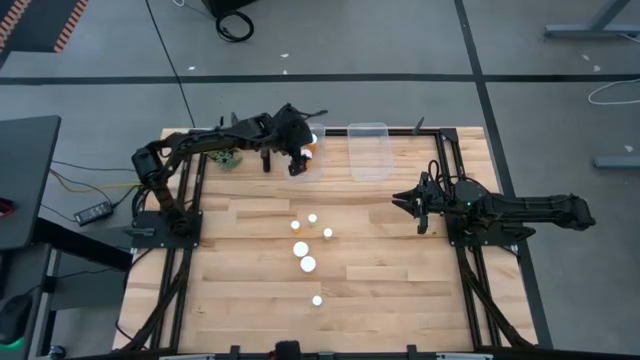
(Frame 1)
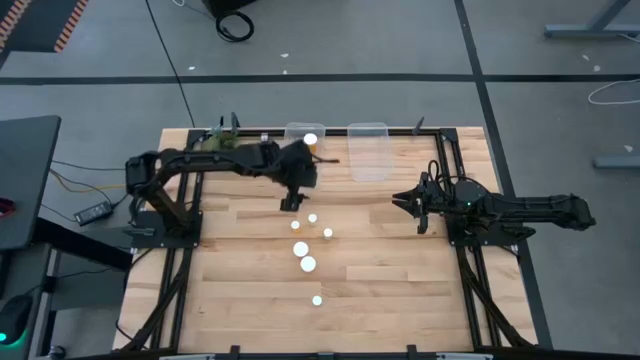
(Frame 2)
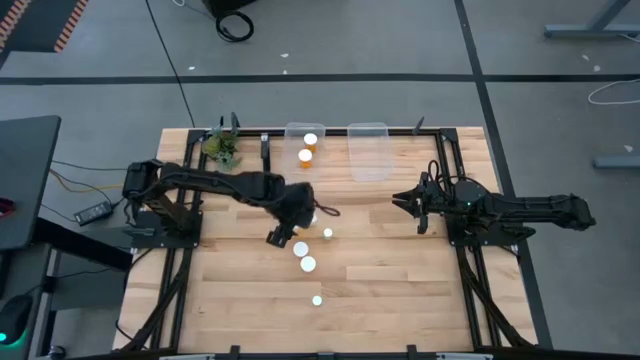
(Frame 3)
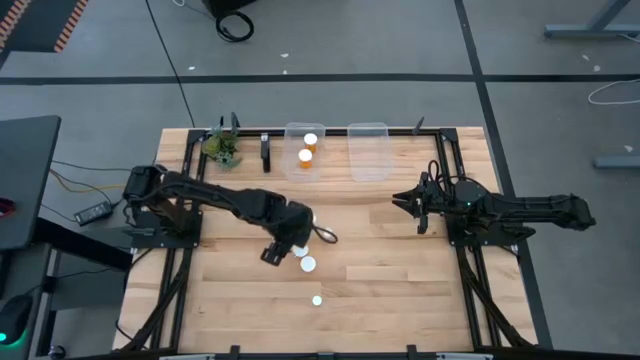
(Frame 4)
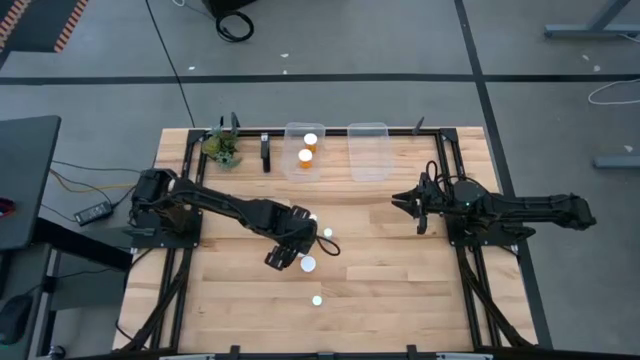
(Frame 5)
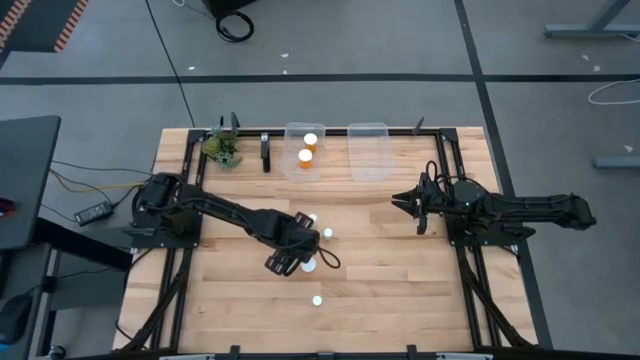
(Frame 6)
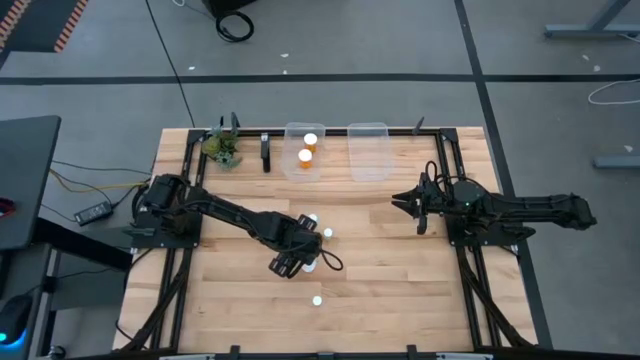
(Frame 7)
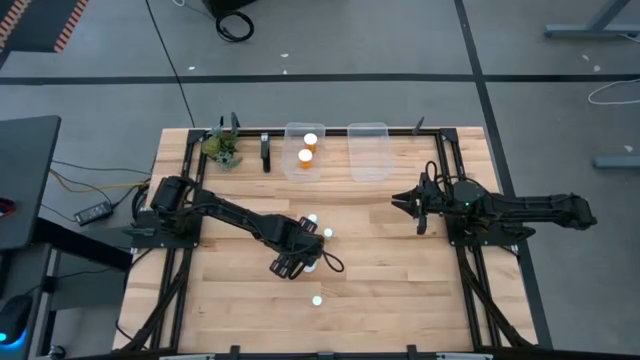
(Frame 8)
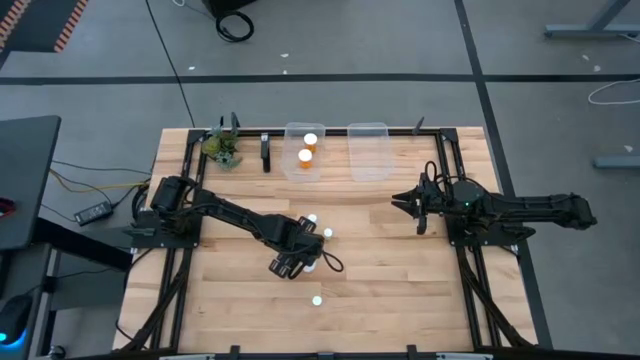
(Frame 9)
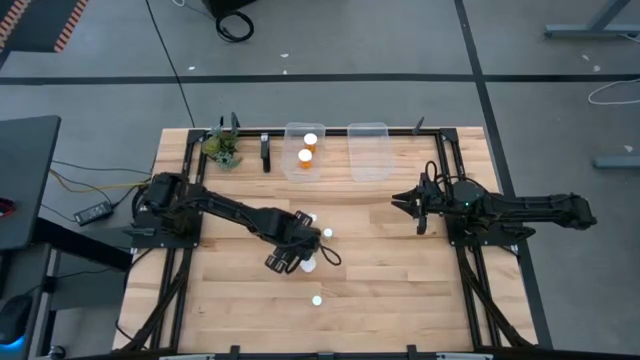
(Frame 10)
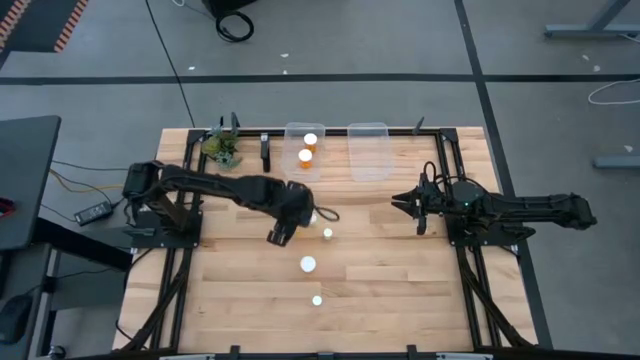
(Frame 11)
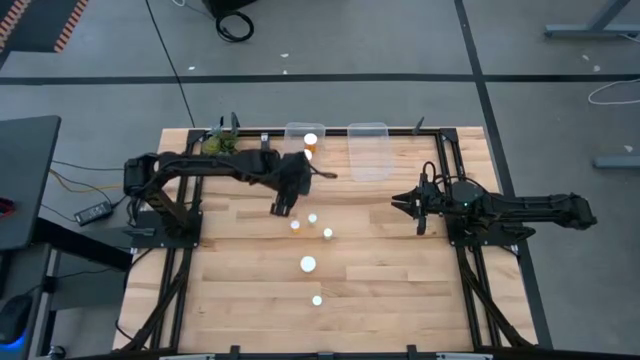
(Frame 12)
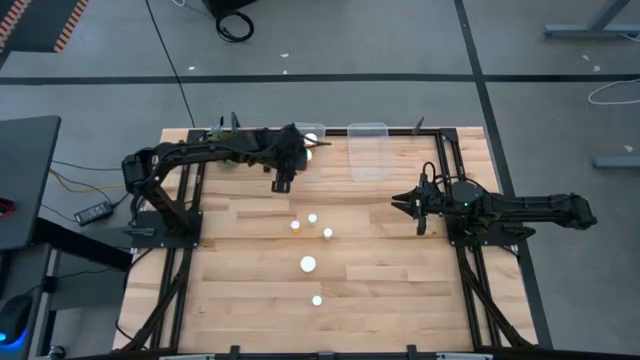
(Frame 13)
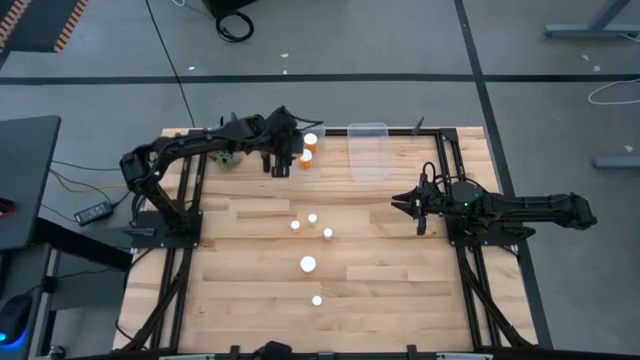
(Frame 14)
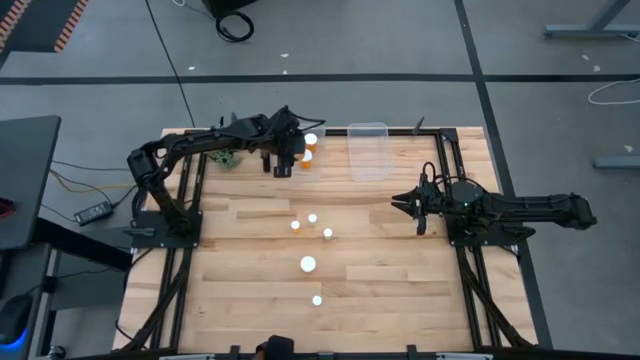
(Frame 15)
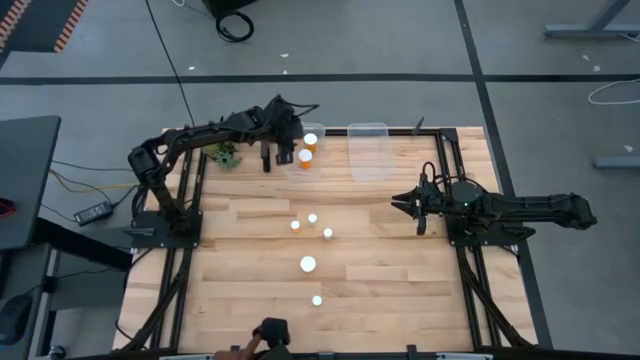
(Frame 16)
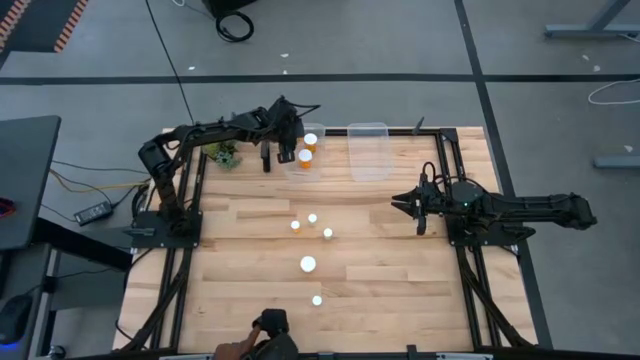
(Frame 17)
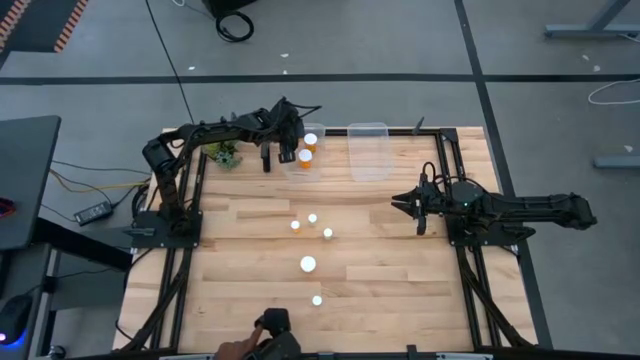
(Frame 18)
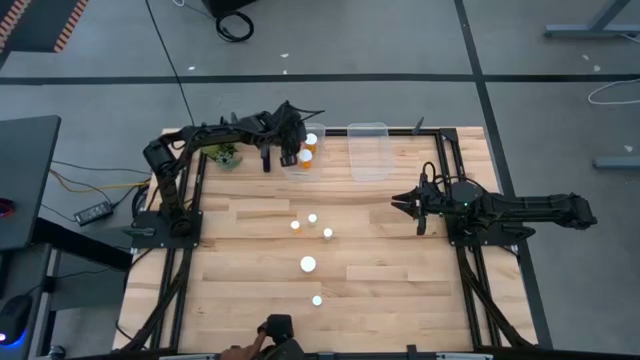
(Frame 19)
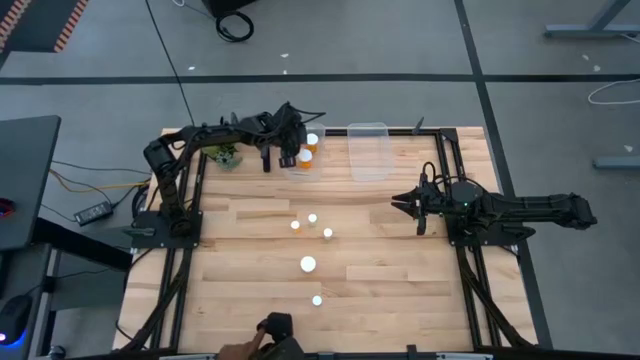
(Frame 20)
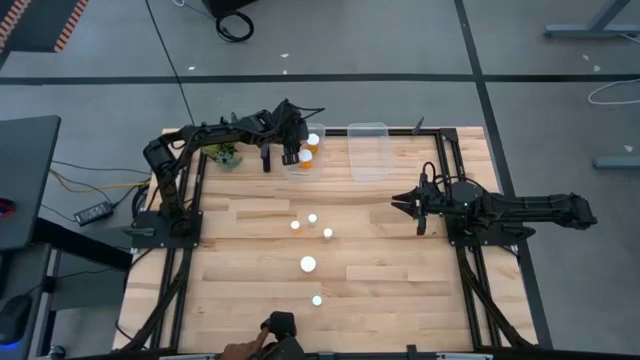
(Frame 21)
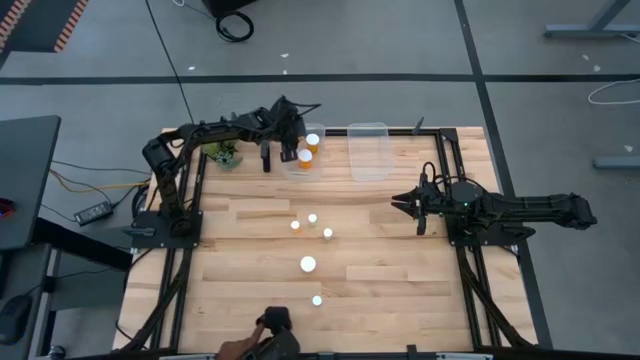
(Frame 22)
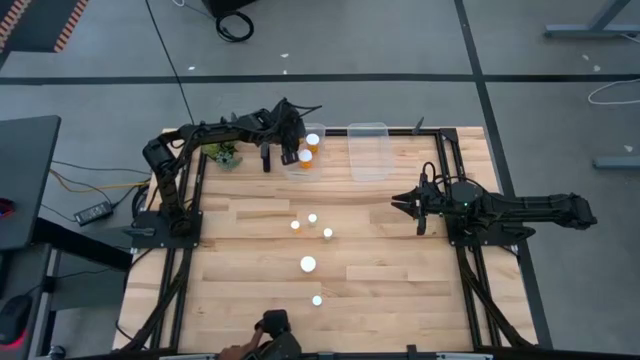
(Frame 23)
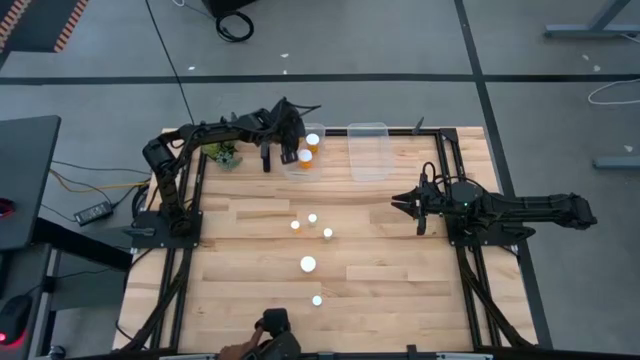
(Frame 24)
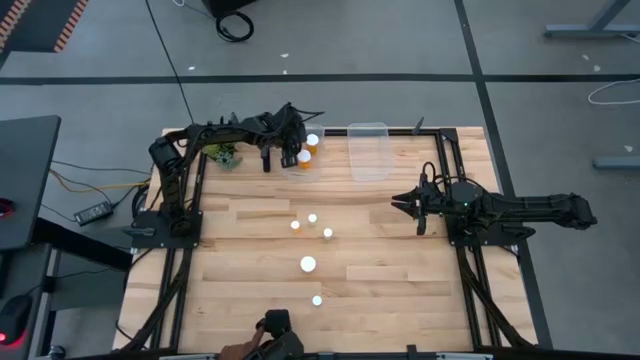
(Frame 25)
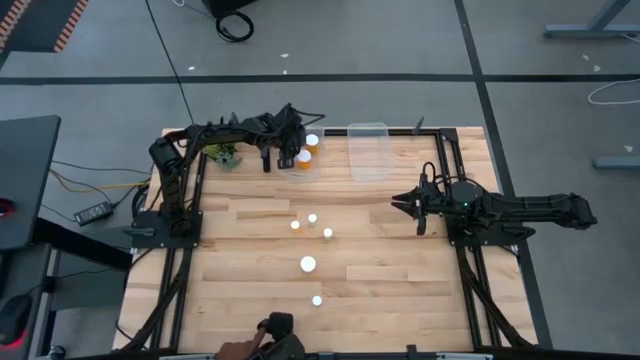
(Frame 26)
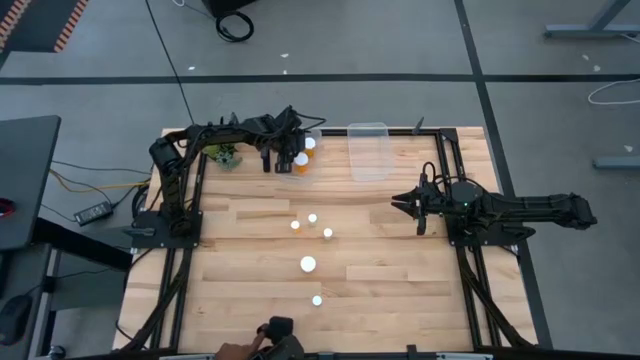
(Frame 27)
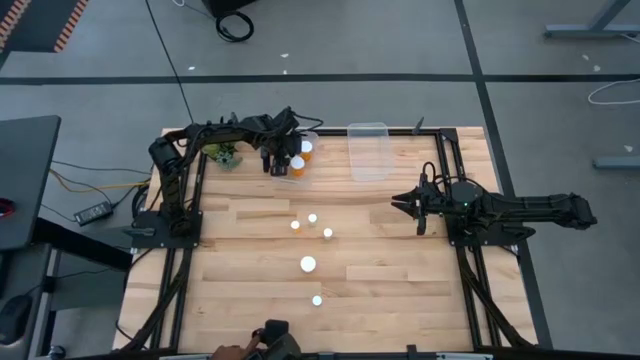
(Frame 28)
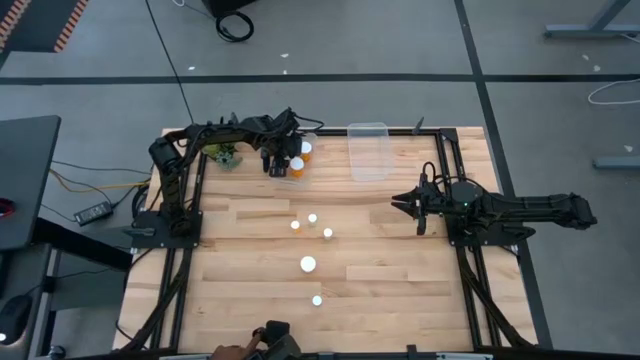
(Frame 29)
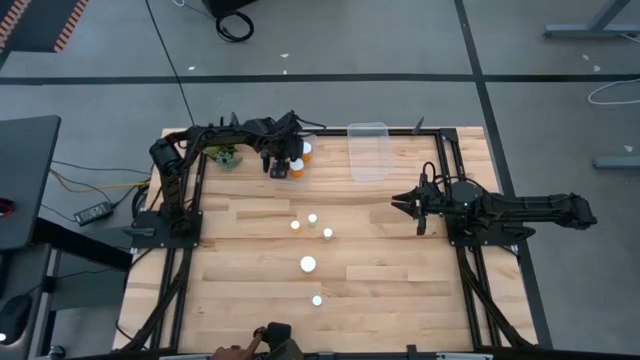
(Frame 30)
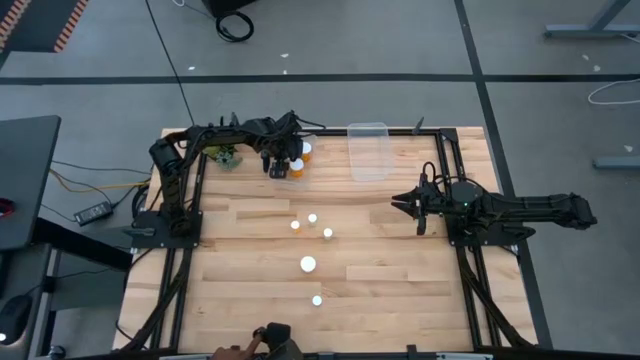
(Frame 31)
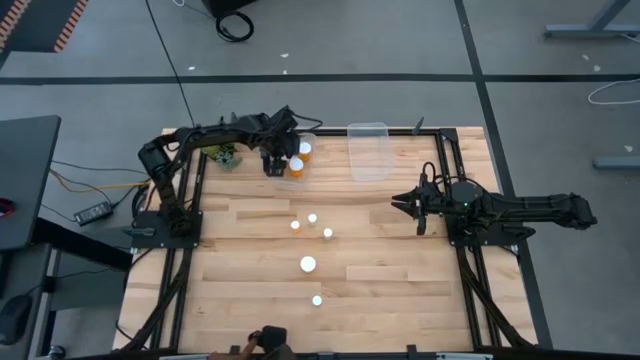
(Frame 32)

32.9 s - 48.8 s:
Task: Pick and place medicine bottles into bin by pill shape (circle, oval)
Put the large orange pill bottle into the left transparent bin

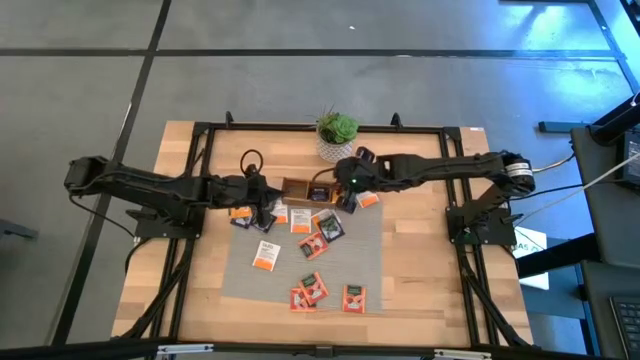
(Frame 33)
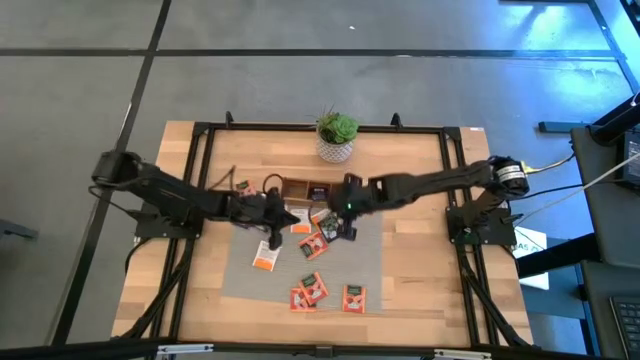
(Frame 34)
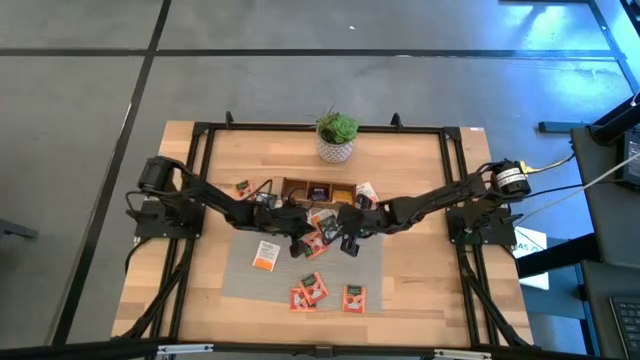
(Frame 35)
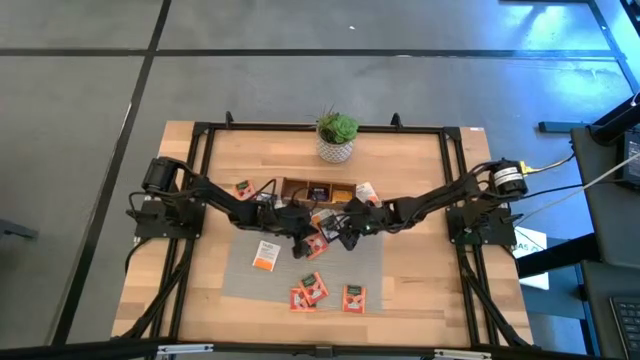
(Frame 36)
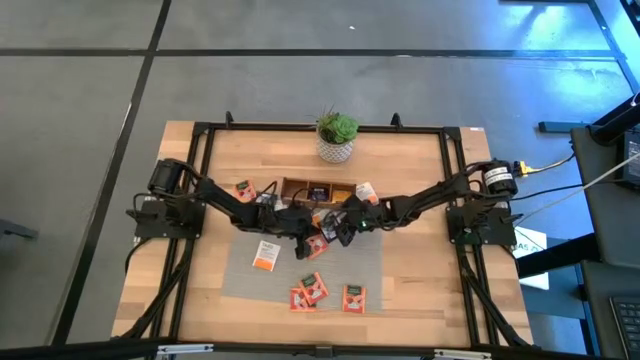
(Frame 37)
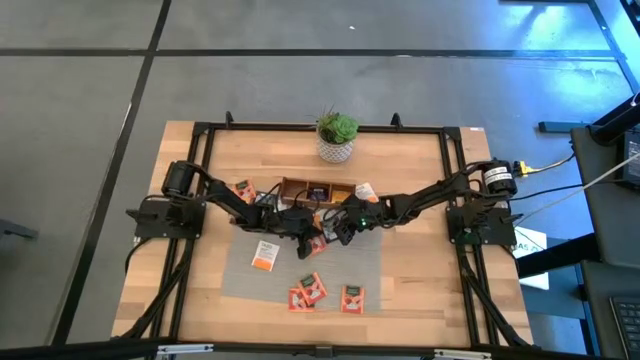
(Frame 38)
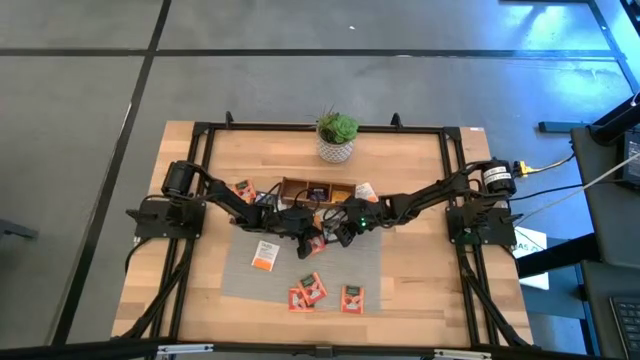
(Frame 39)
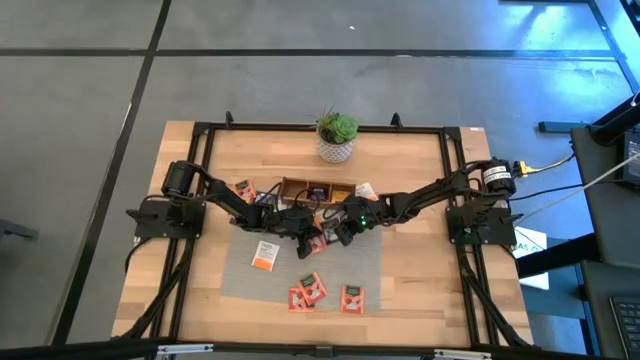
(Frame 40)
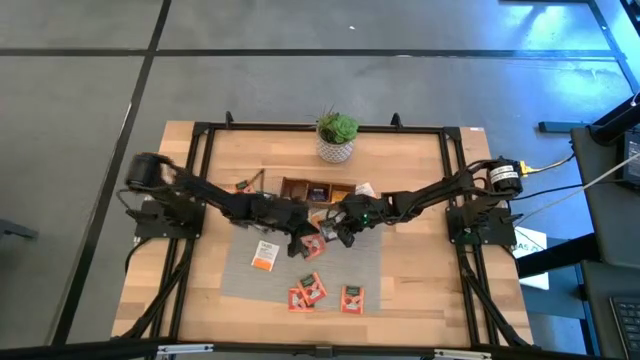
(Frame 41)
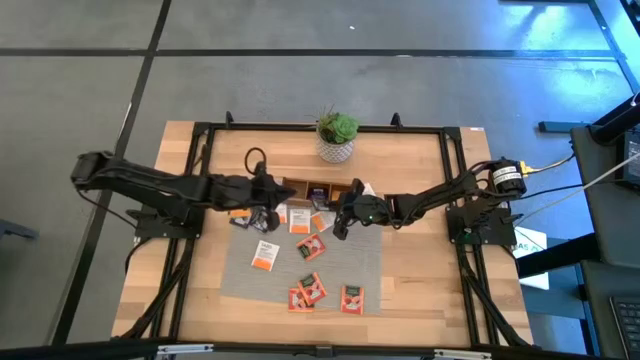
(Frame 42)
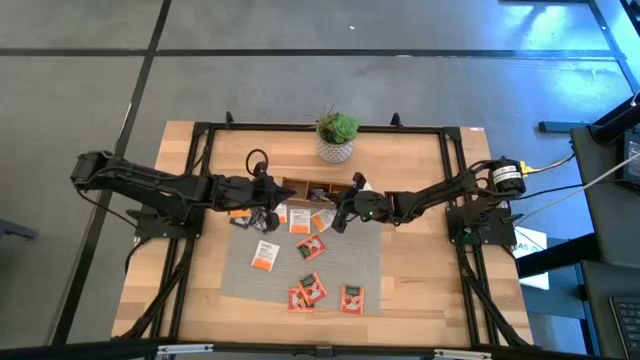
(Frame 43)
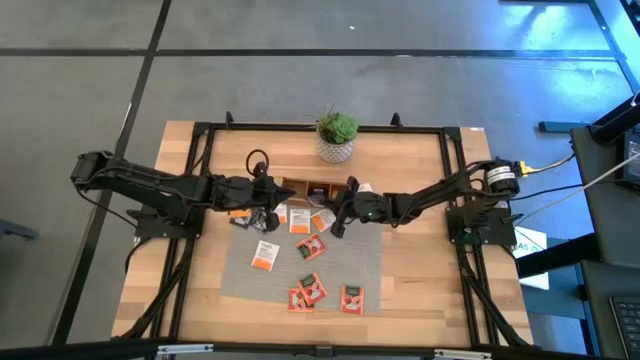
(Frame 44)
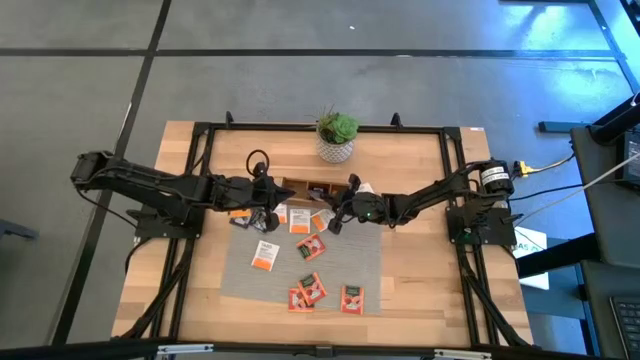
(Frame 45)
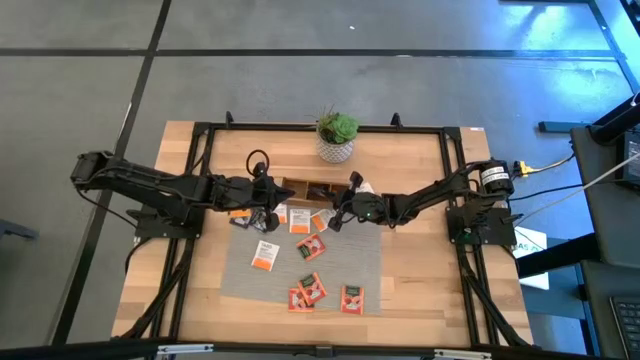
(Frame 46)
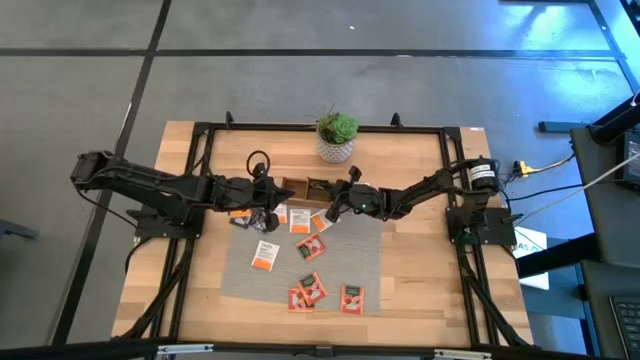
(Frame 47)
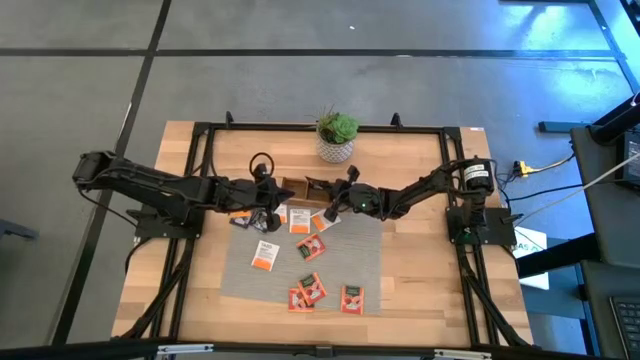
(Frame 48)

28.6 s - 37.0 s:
Task: Pick & Place Tea
Put the dark blue tea bag into the middle section of the wooden organizer
